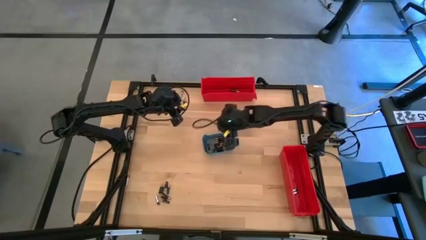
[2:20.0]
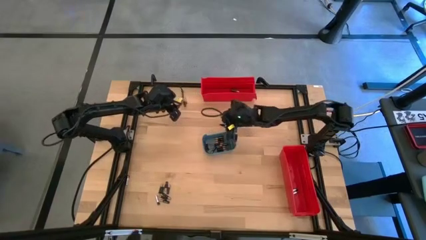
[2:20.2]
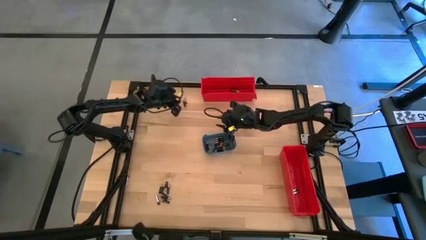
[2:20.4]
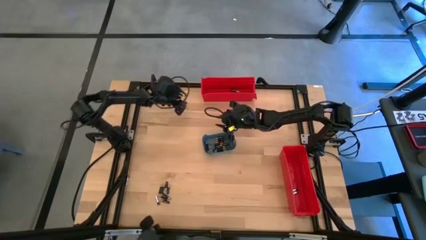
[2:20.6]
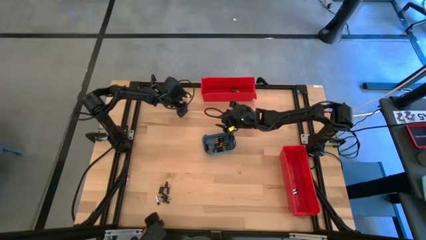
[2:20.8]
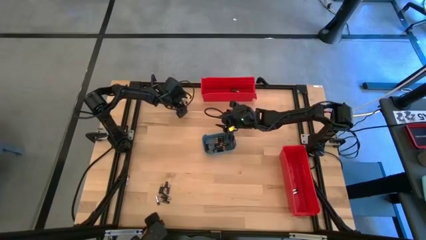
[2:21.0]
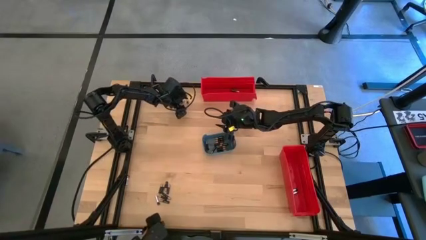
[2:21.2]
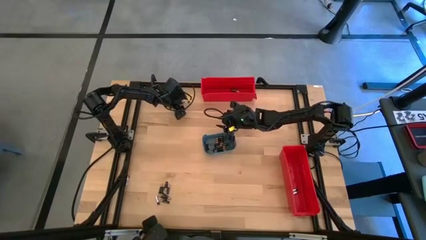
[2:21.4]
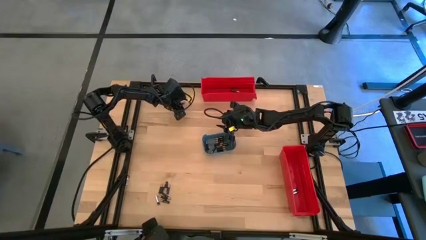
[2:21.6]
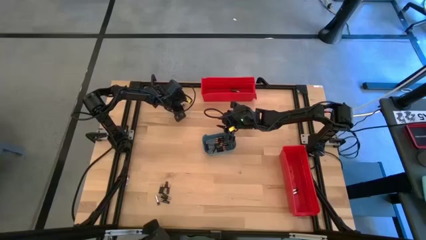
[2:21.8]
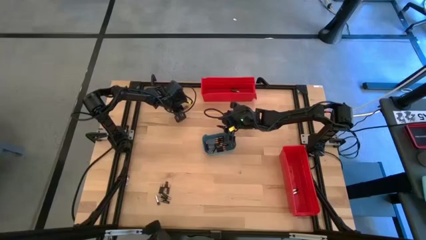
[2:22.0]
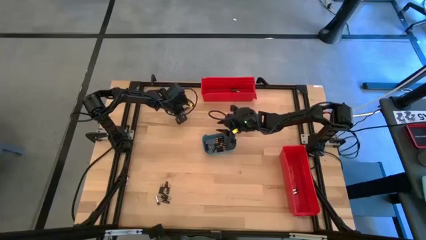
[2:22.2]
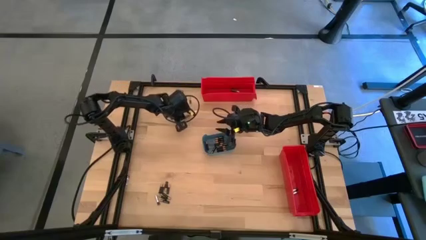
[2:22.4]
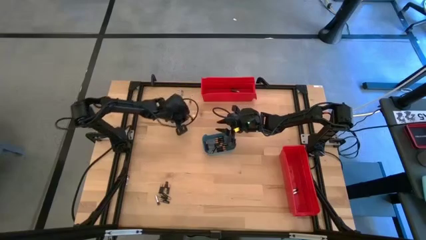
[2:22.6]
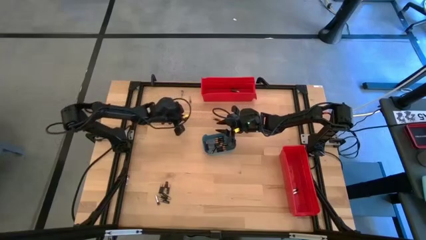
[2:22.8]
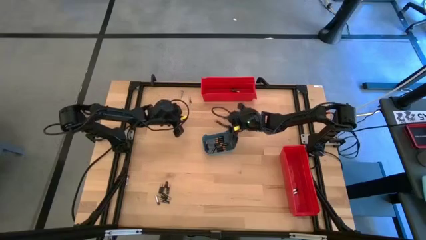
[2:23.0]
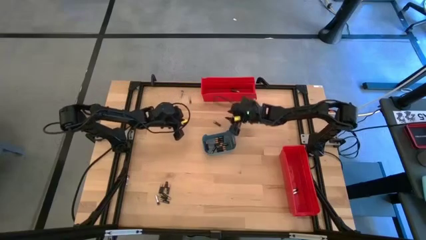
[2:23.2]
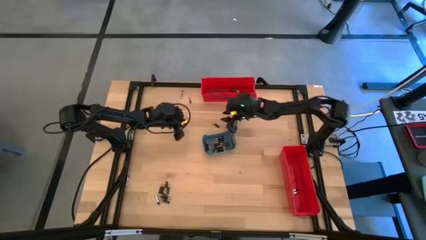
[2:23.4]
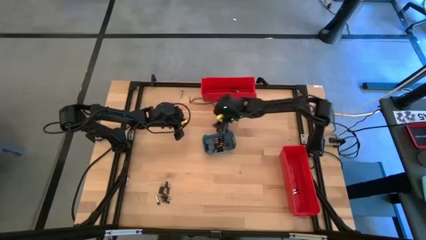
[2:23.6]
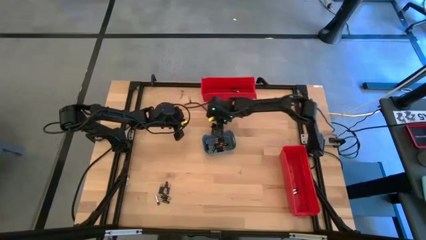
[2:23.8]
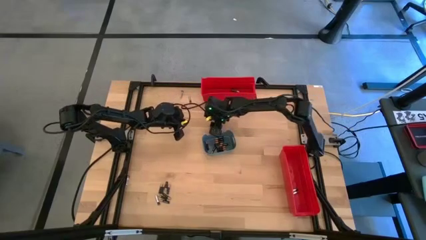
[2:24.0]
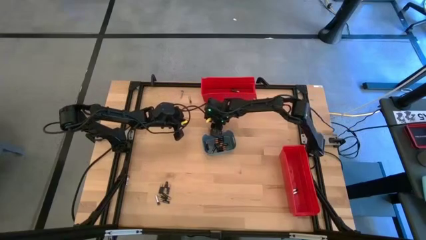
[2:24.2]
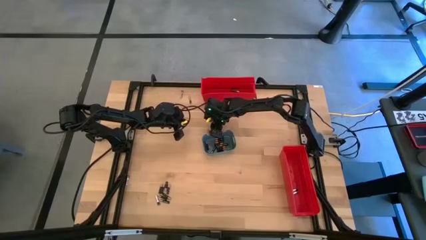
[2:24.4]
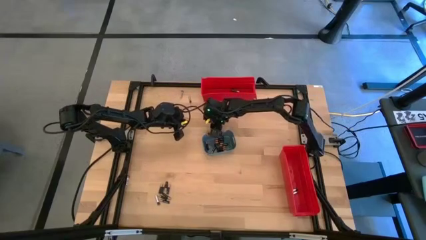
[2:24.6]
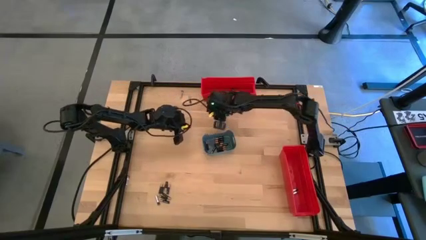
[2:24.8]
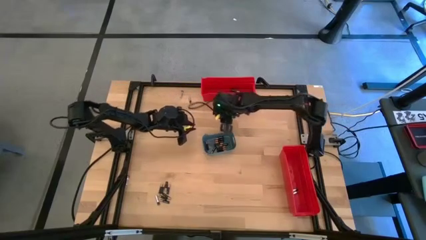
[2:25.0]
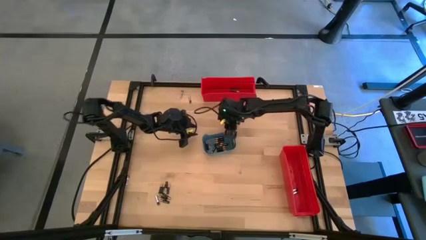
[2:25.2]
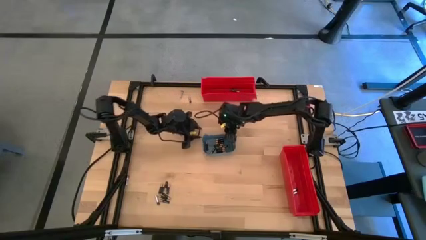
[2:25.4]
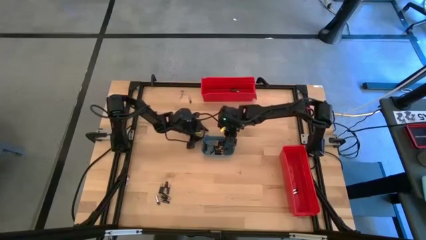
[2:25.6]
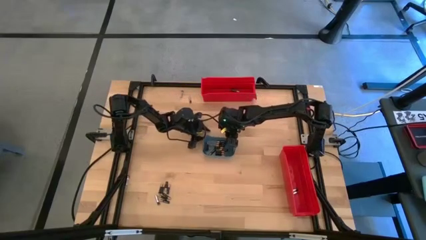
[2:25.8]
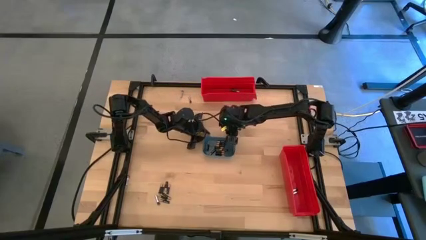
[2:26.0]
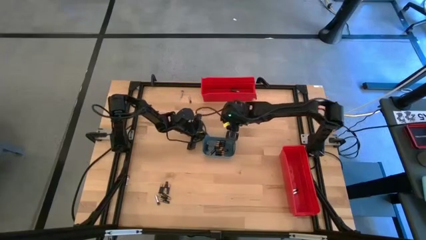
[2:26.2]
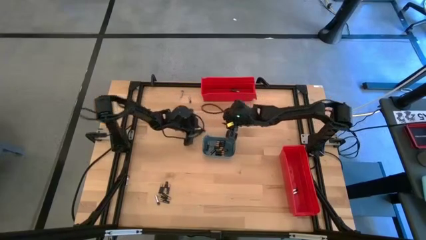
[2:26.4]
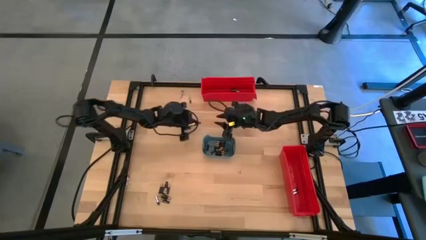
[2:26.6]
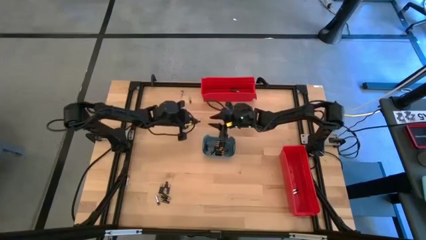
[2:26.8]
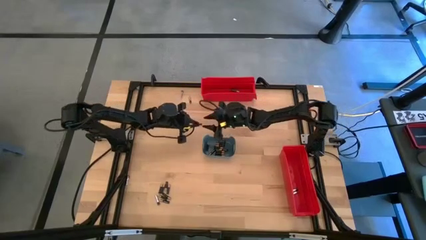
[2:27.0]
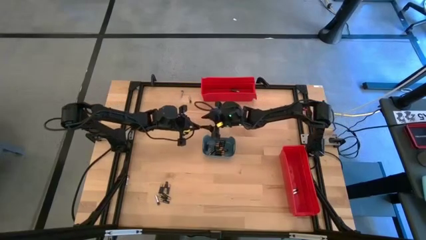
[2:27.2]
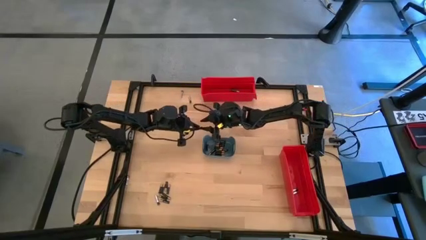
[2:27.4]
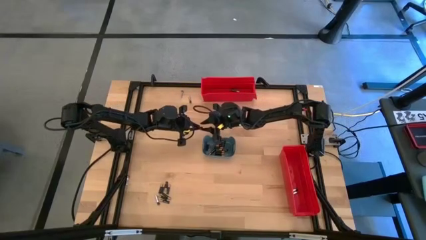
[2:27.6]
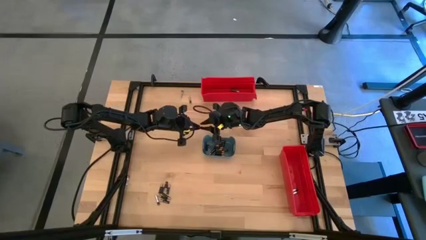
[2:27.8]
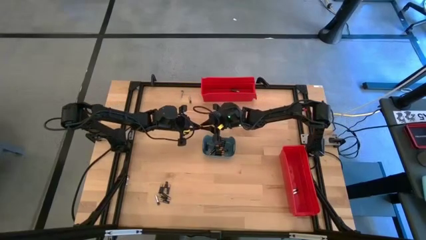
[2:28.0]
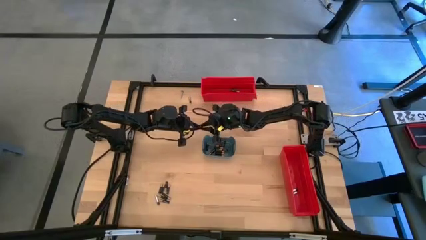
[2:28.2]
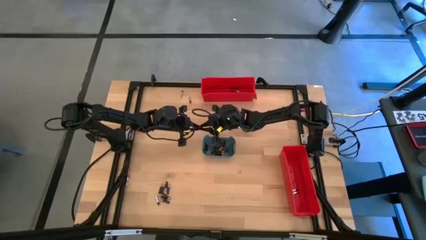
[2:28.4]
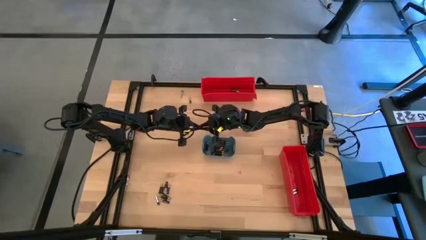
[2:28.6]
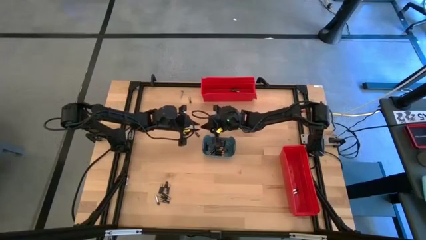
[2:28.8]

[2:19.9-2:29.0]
Task: Sort batteries
Put the black battery into the blue bin

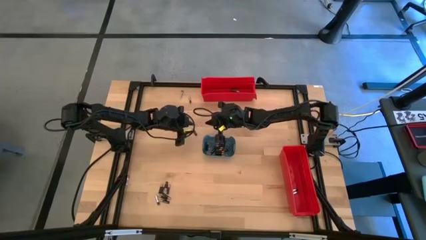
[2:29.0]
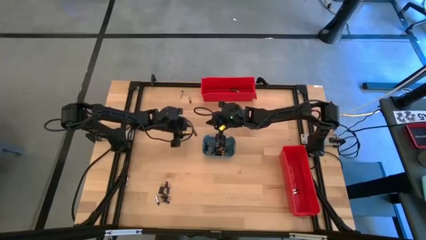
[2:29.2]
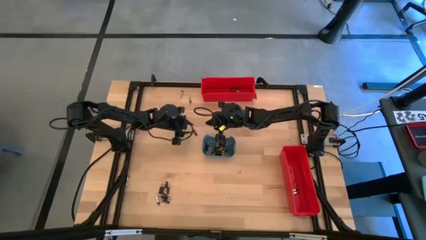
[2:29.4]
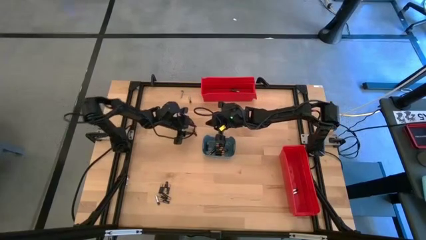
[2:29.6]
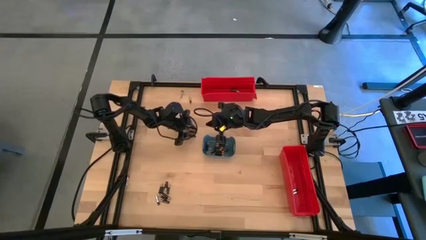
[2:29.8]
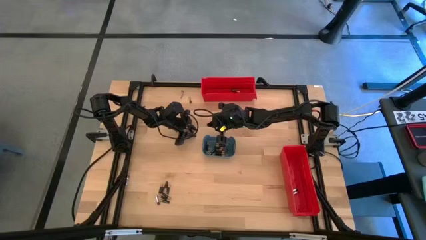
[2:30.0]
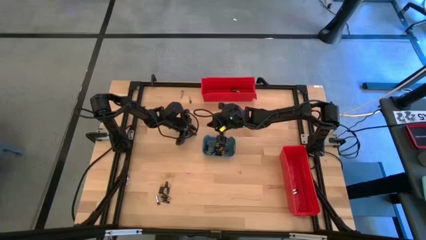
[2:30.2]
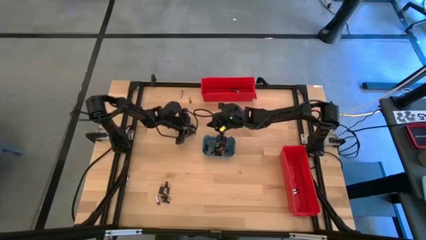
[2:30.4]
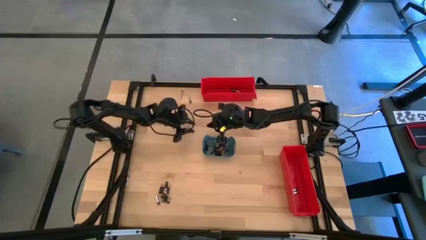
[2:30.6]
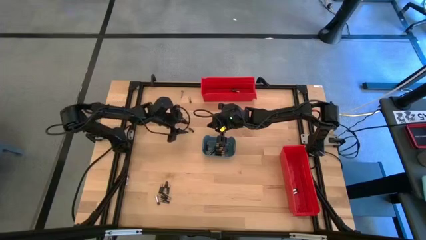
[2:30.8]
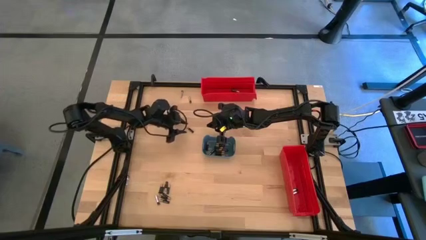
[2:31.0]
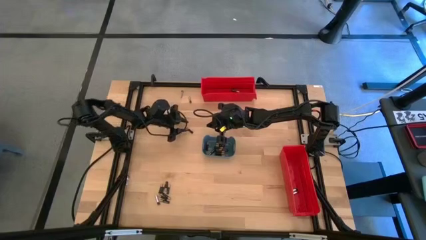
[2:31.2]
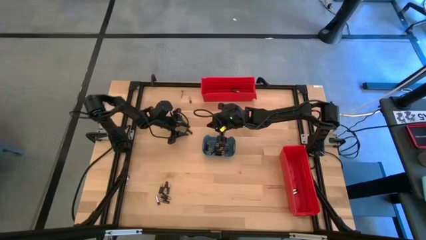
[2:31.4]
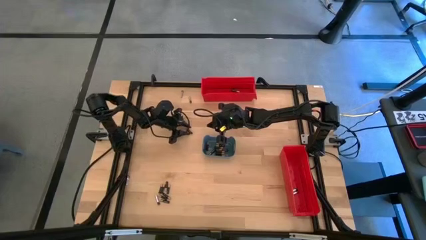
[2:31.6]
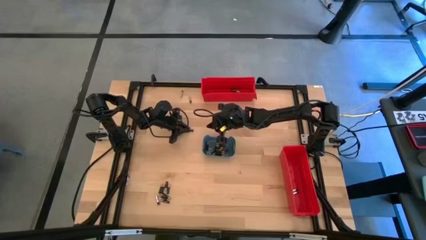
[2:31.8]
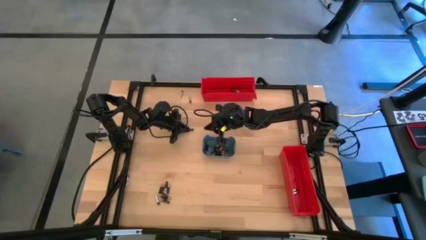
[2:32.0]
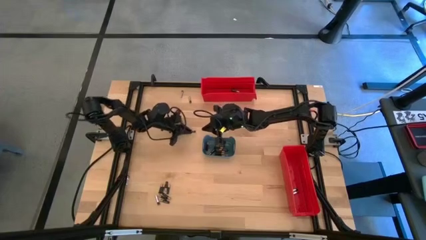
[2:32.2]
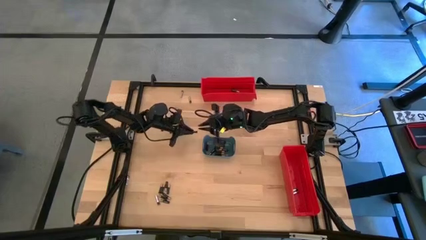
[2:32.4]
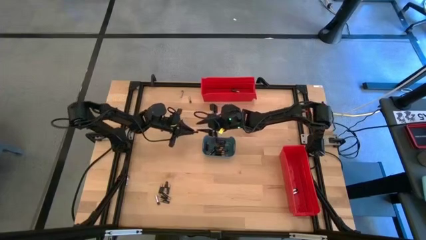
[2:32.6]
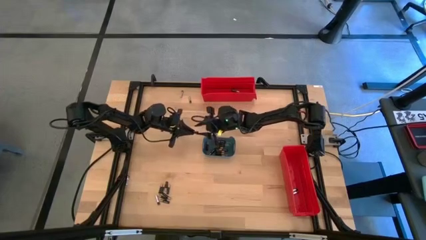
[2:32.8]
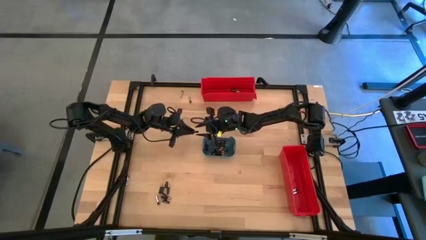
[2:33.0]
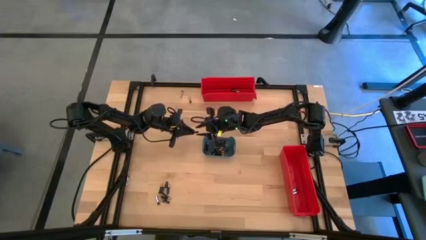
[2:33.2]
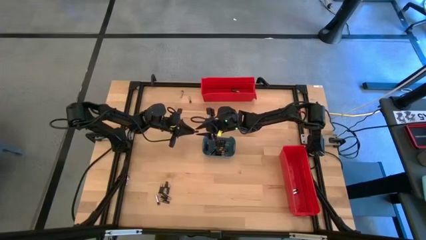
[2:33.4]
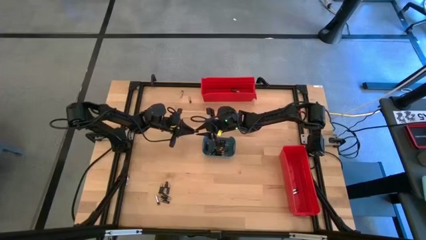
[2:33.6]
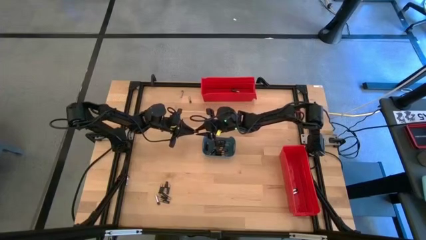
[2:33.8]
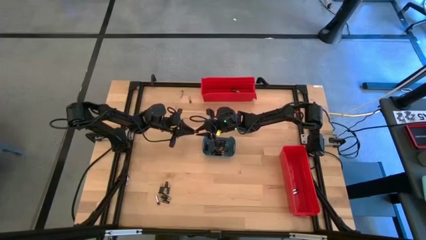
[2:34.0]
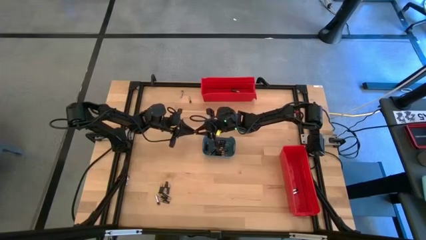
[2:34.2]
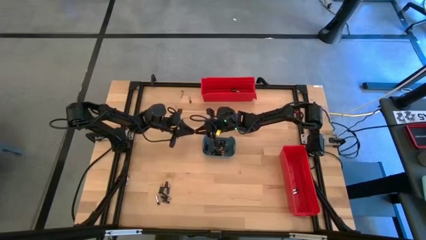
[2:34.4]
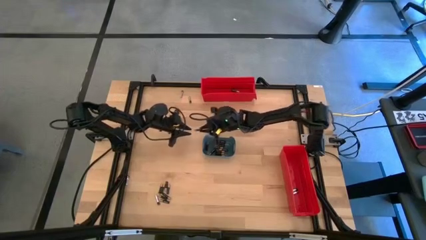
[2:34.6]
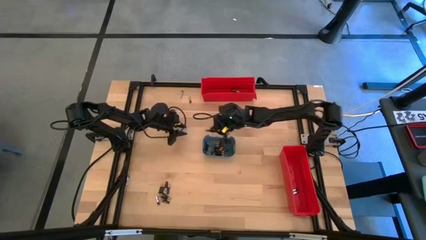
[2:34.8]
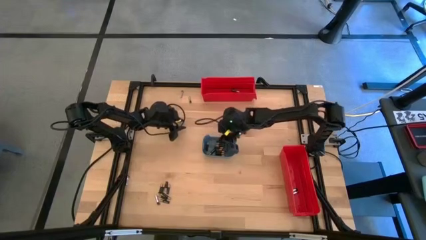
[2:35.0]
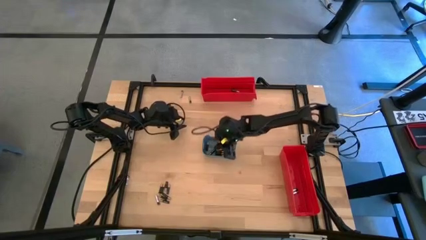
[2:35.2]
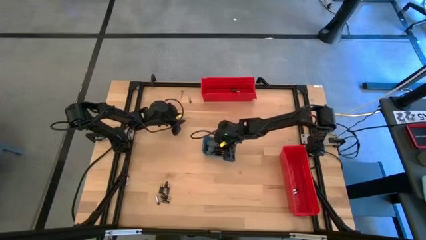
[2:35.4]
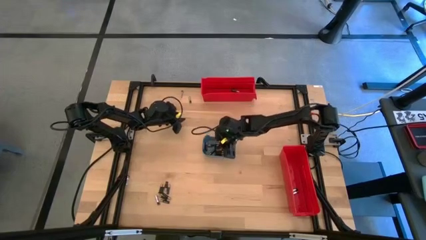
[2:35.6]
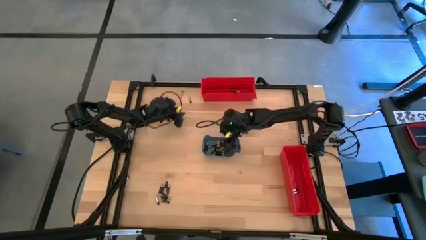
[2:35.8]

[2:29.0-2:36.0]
Put the black battery into the blue bin
